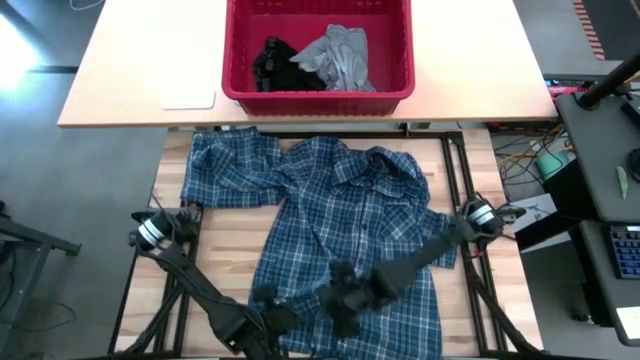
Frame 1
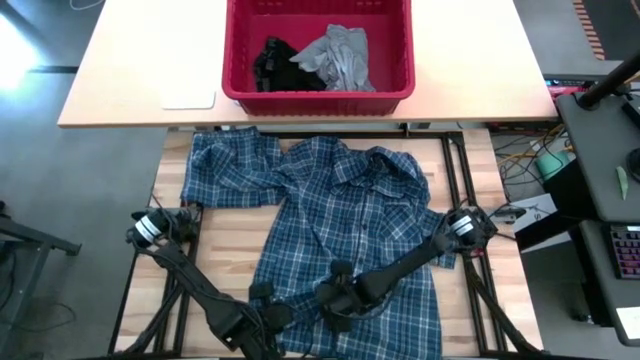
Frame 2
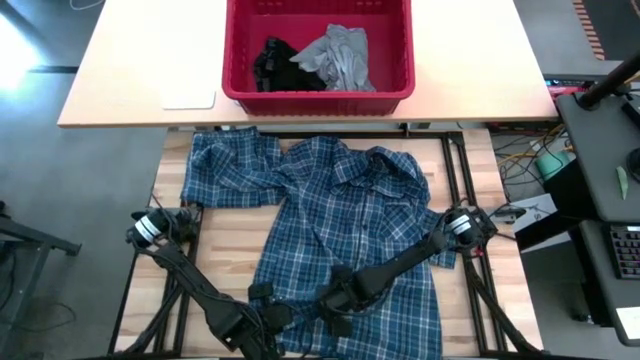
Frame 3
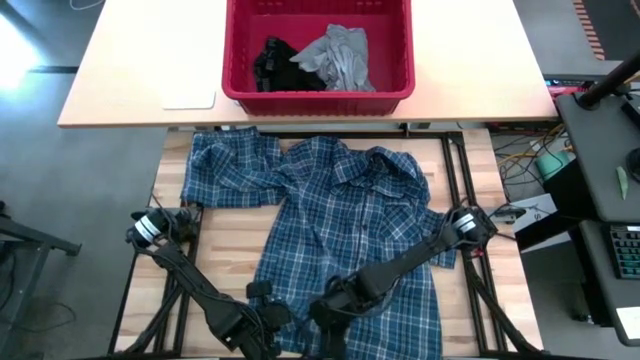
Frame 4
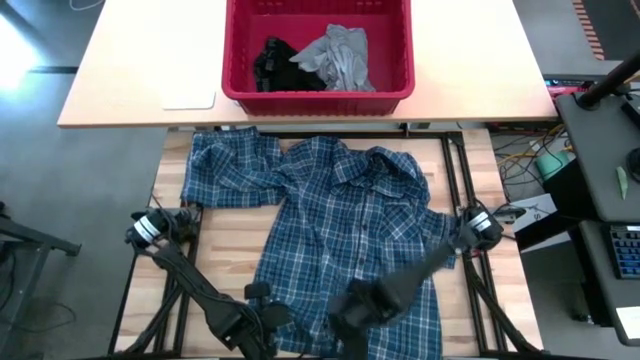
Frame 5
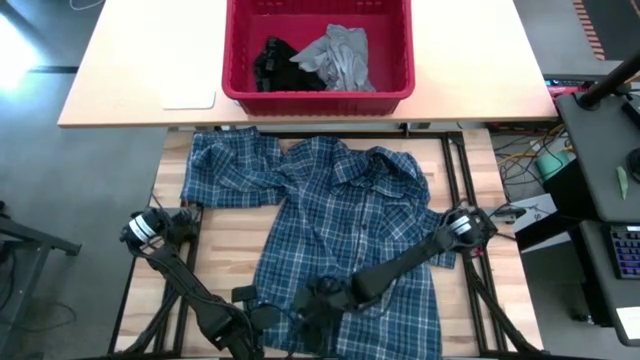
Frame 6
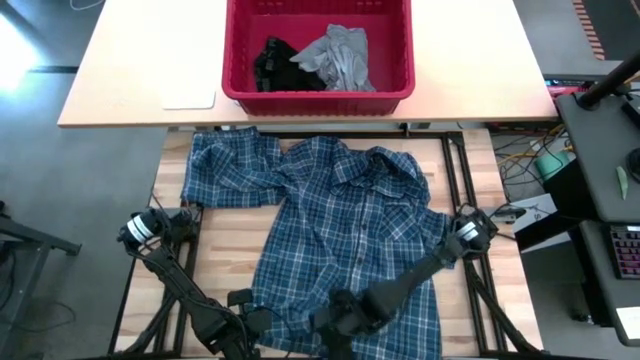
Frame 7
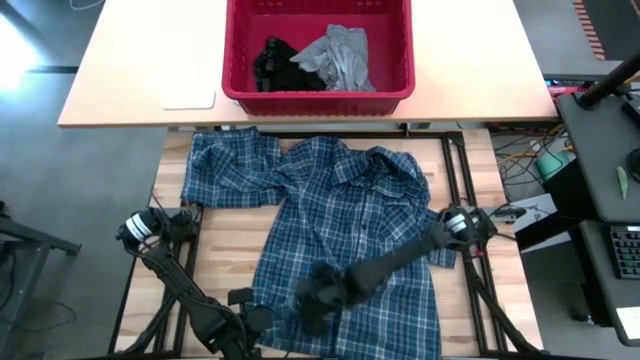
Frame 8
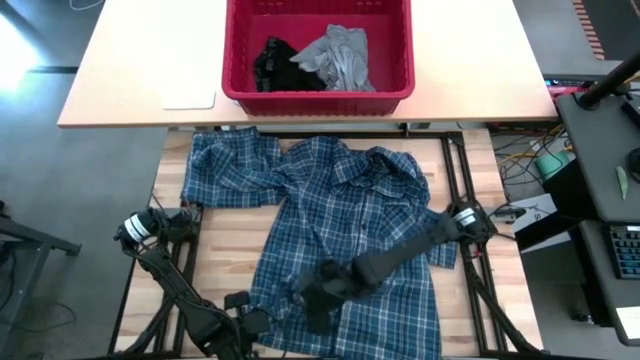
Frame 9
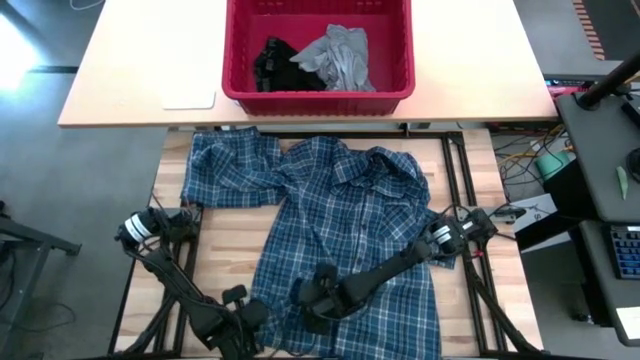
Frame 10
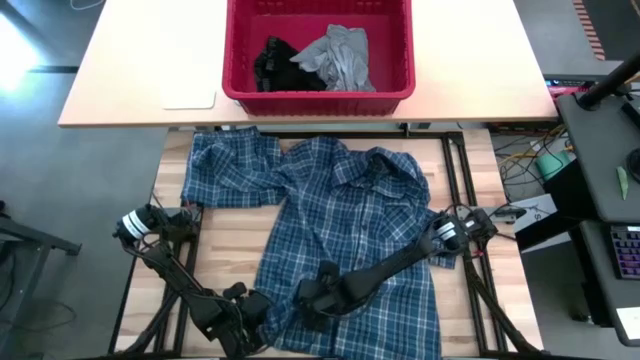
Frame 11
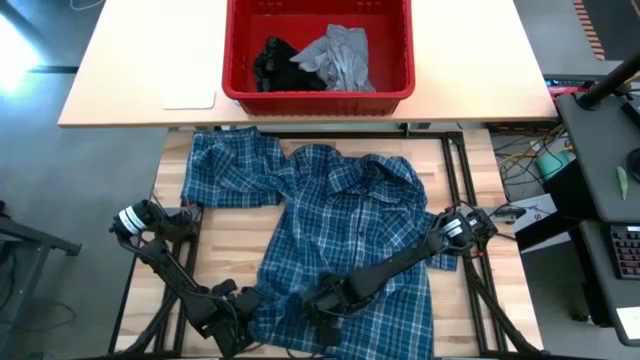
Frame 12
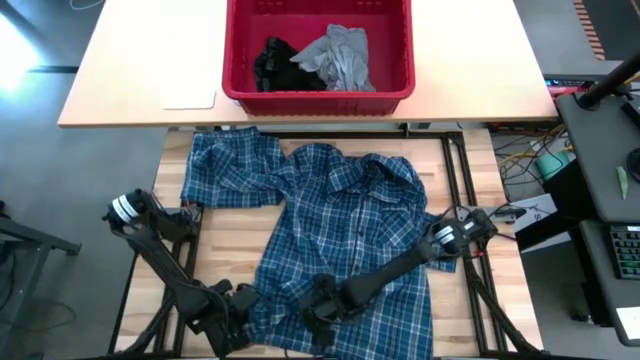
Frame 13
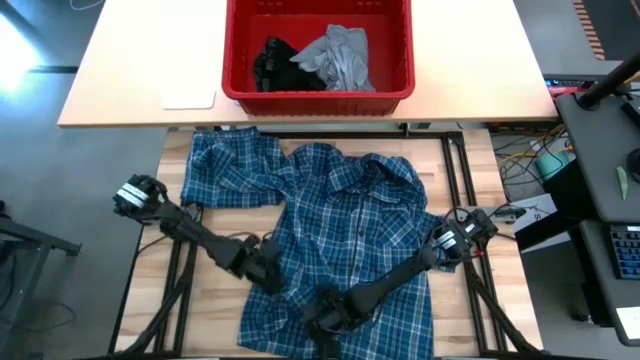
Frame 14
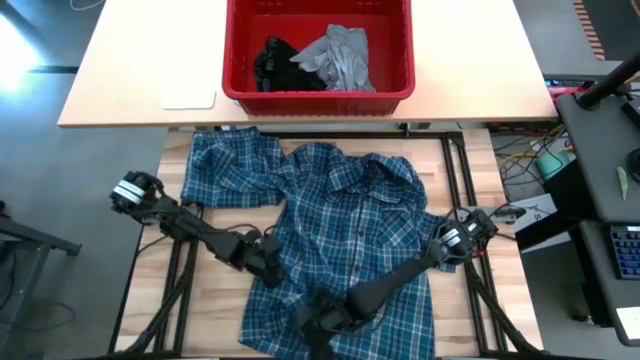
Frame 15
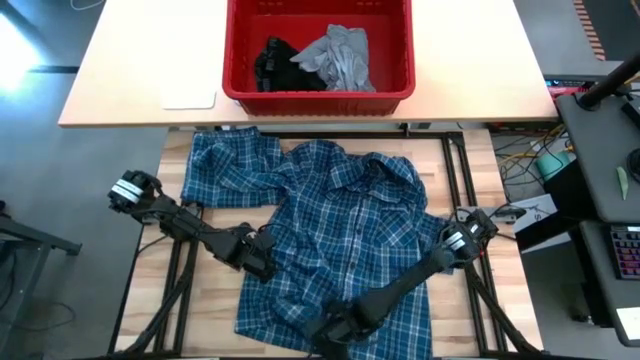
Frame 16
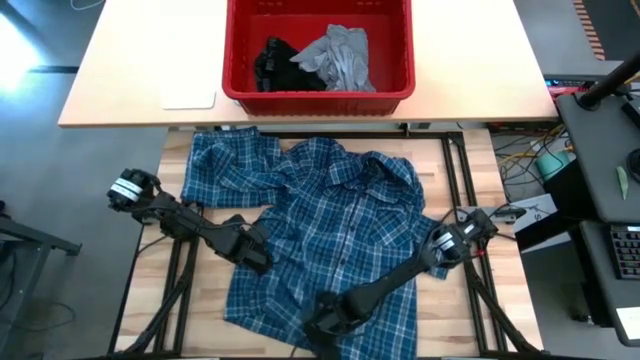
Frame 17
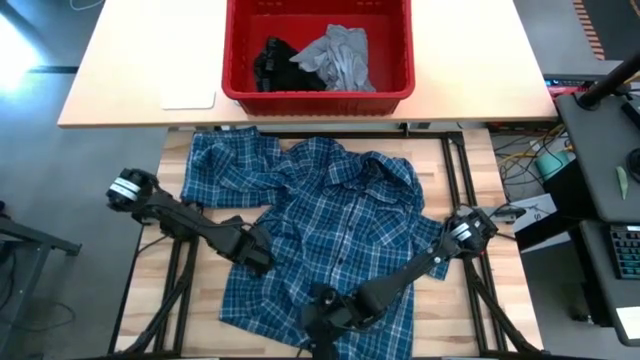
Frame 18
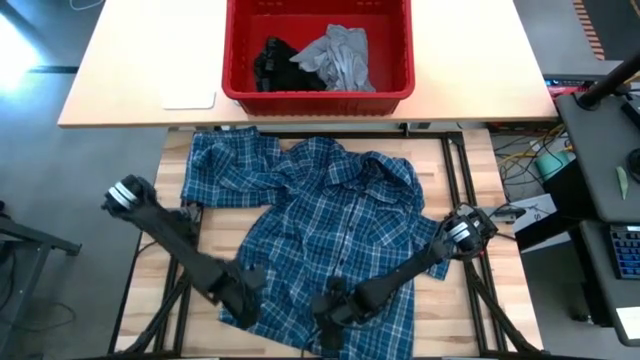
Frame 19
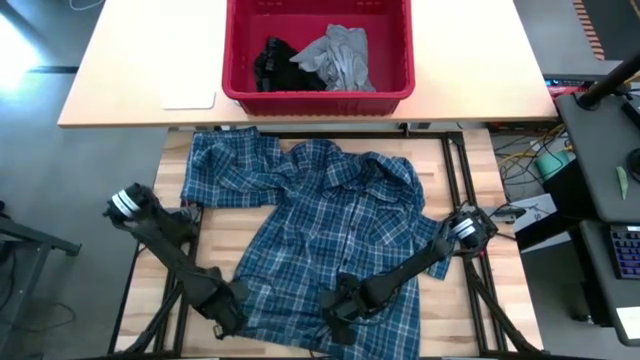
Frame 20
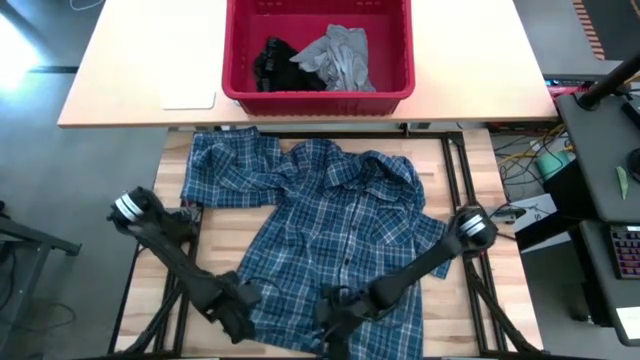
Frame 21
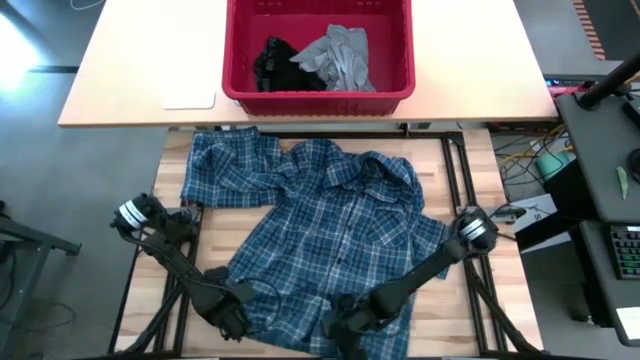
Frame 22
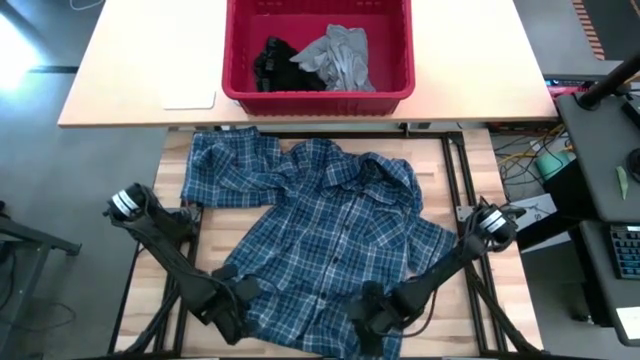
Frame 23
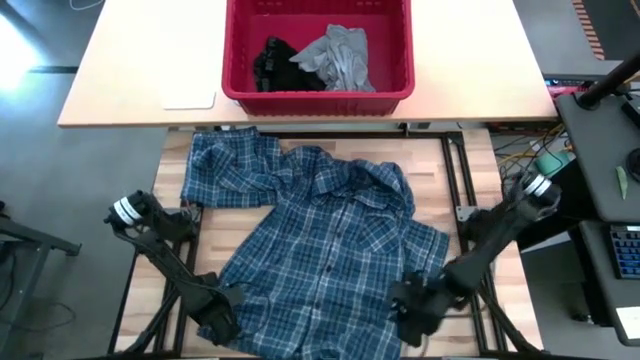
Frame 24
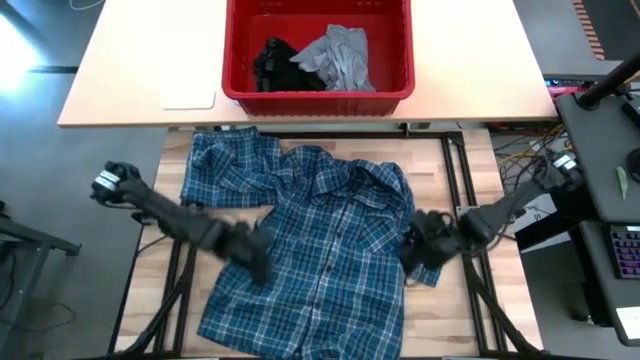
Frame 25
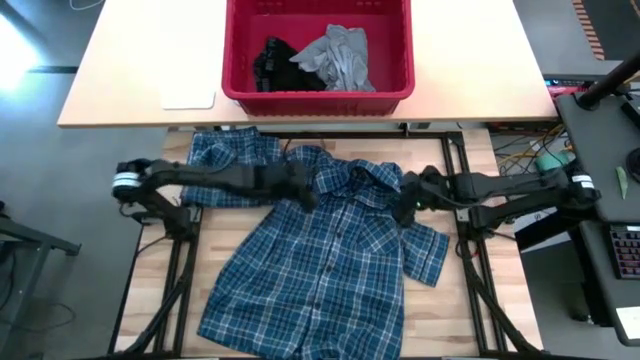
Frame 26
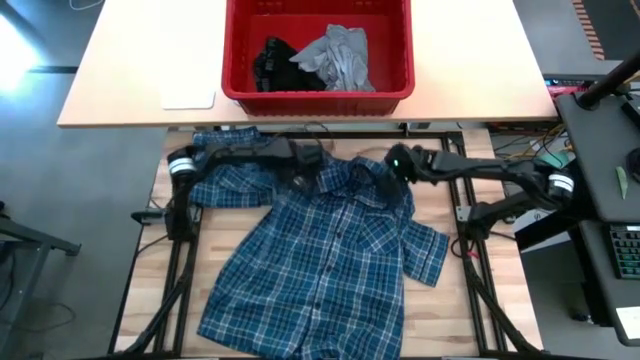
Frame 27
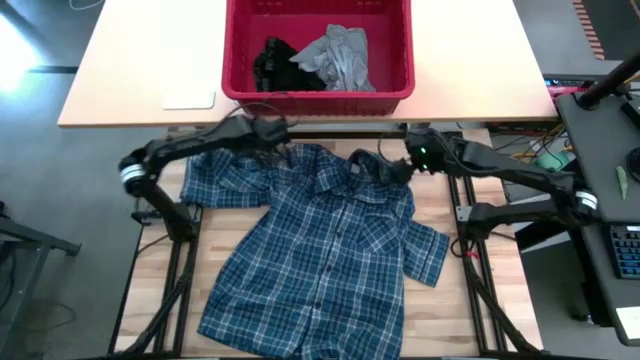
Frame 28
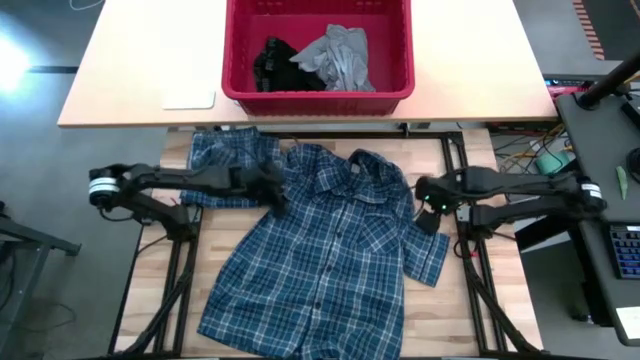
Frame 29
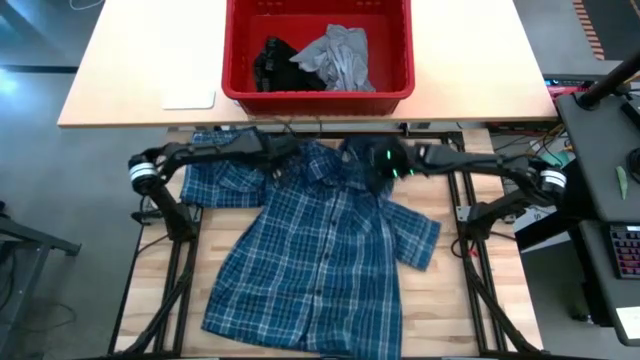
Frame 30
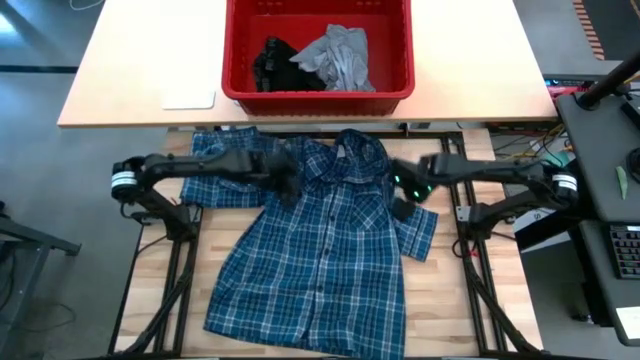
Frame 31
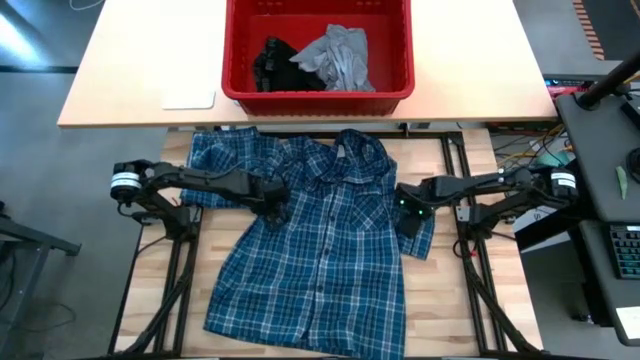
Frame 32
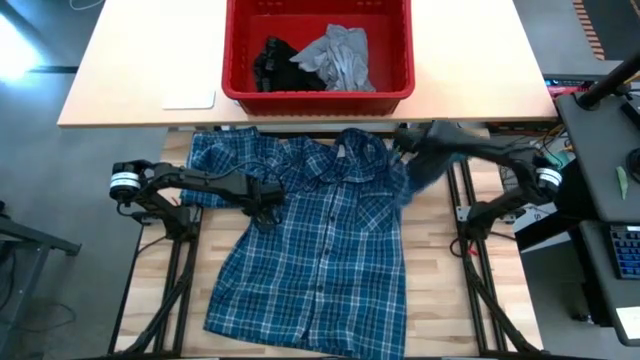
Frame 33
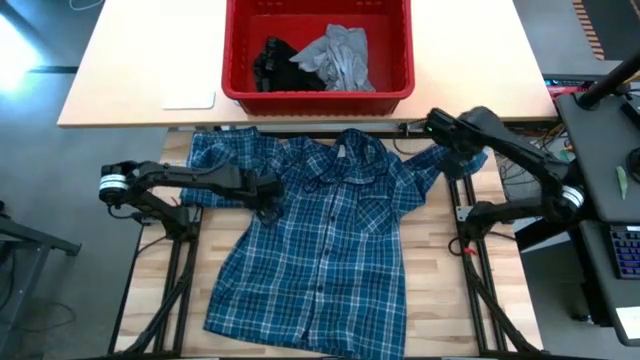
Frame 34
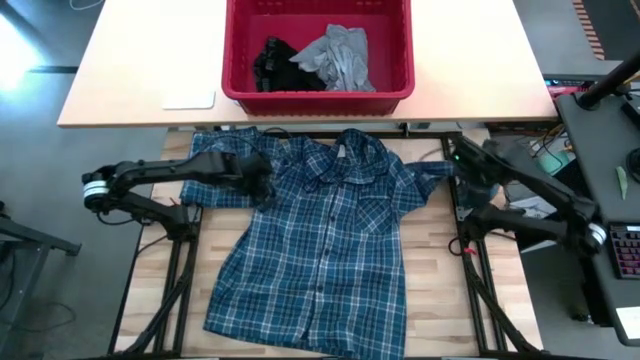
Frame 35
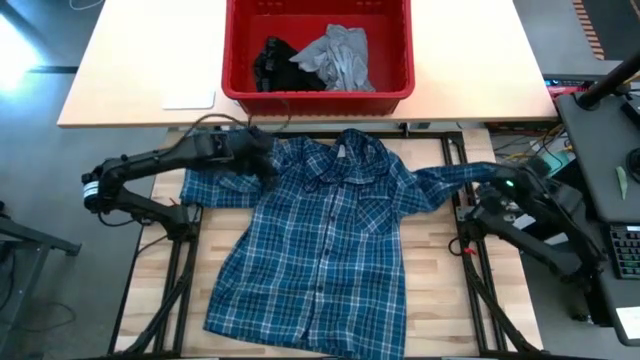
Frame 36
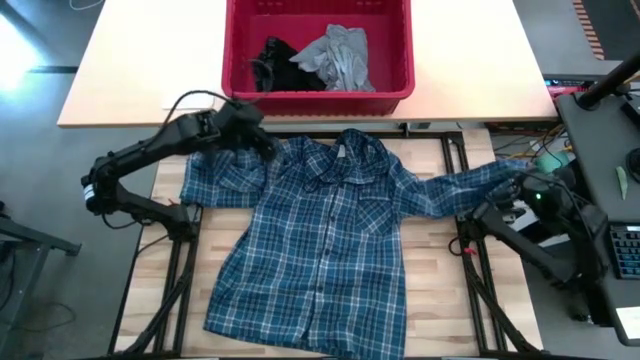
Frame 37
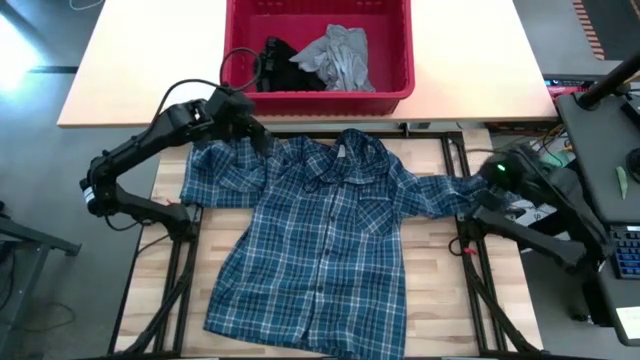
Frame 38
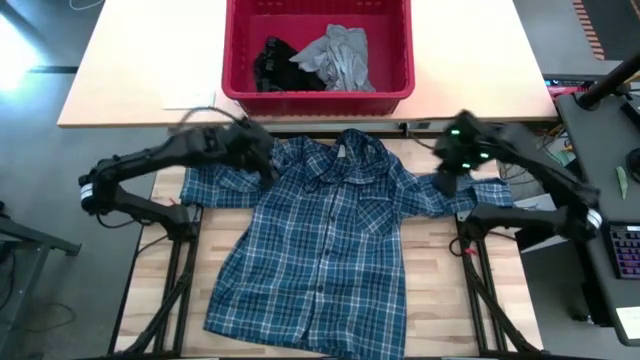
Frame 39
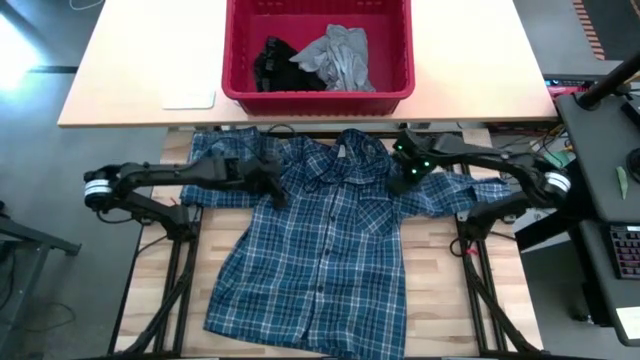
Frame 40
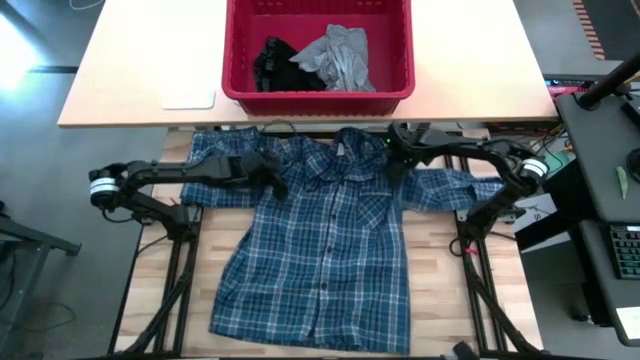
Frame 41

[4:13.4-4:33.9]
Task: Fold Laundry from Bin
Fold the blue patterned long sleeve shirt
